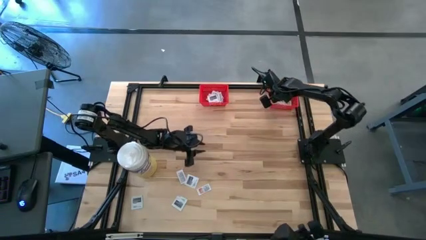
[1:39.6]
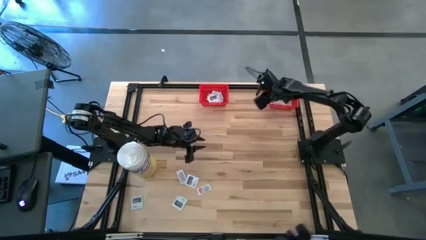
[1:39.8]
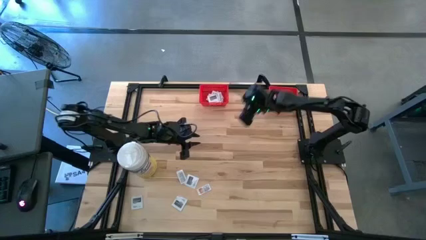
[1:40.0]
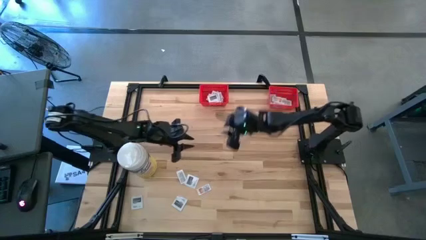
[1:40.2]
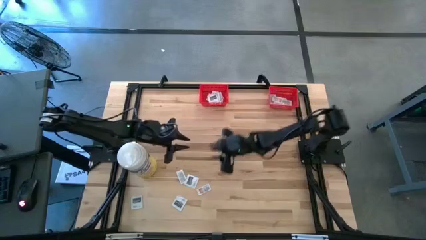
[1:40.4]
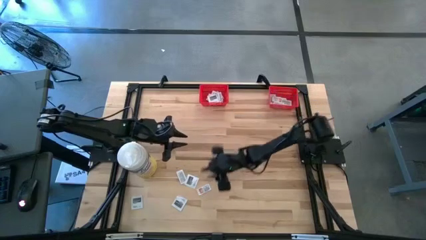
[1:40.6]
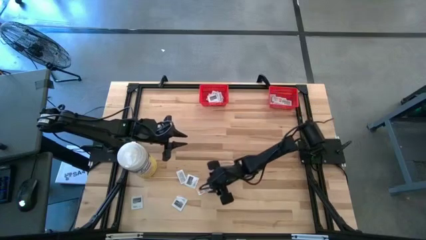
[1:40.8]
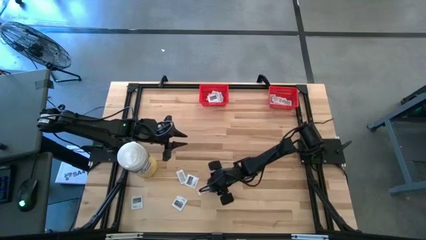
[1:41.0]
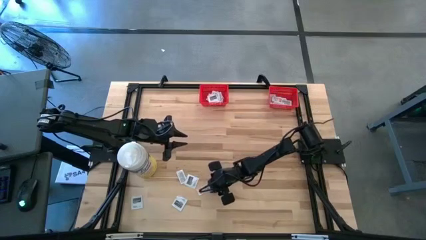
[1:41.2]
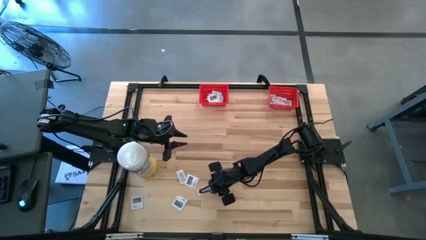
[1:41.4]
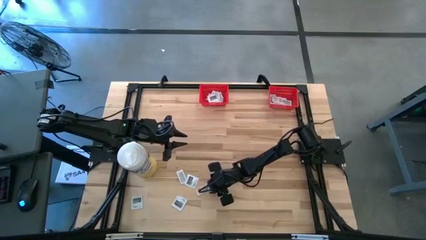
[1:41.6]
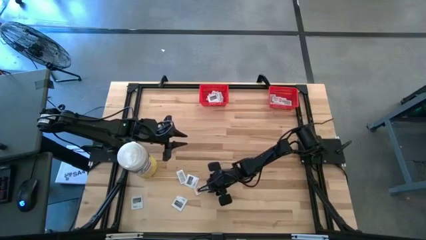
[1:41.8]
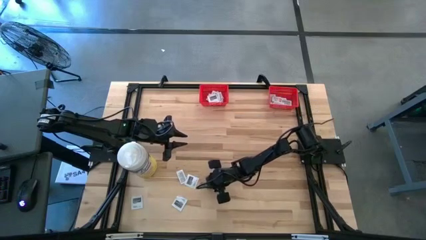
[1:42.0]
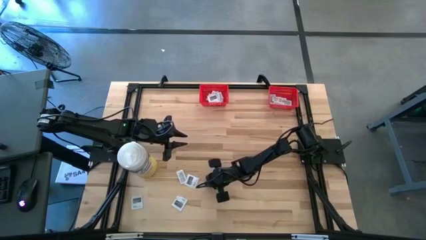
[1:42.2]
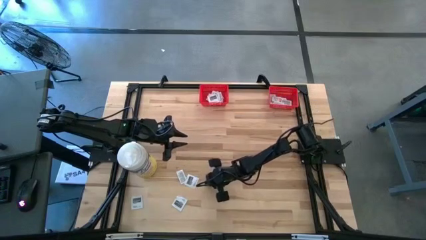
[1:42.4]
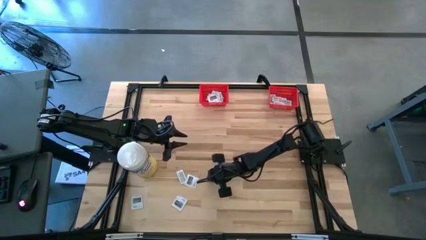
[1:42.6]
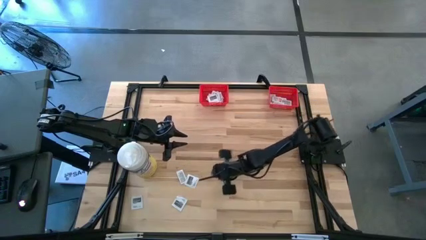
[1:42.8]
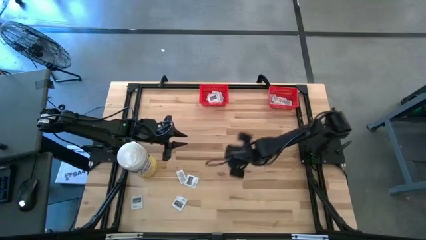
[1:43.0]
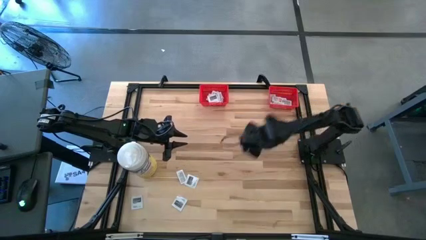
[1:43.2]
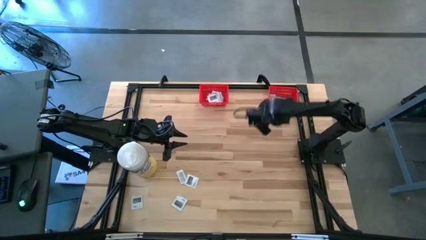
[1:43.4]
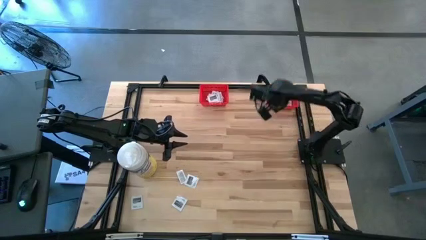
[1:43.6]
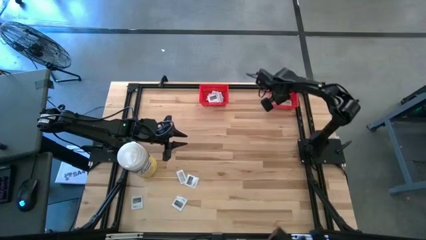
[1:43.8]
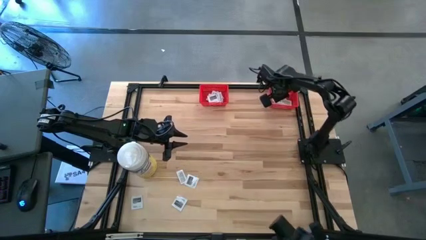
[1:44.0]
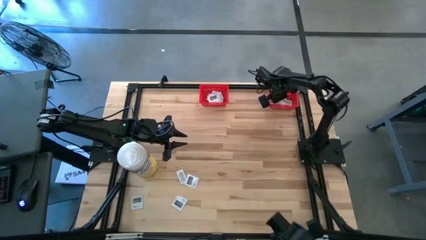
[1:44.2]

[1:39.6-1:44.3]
Task: Pick & Place First Aid Supplies
Put the ointment pack into the right red bin

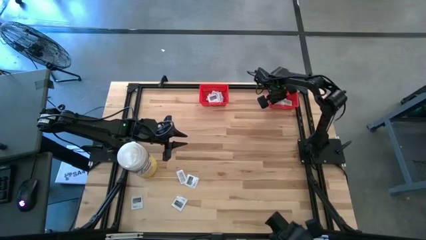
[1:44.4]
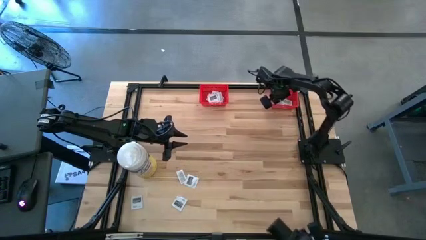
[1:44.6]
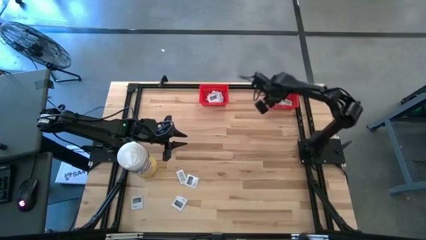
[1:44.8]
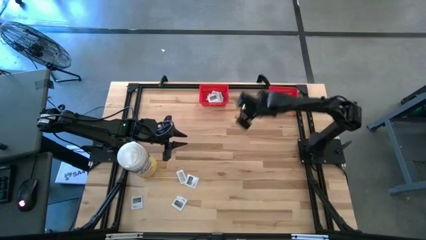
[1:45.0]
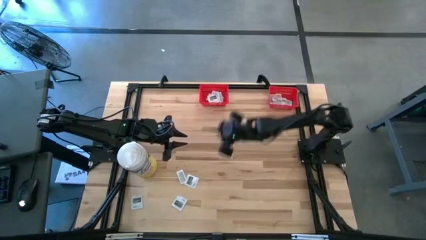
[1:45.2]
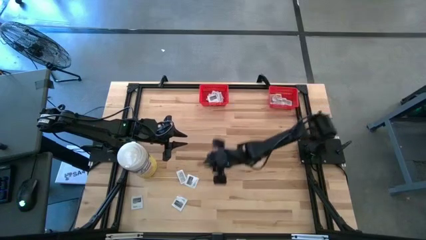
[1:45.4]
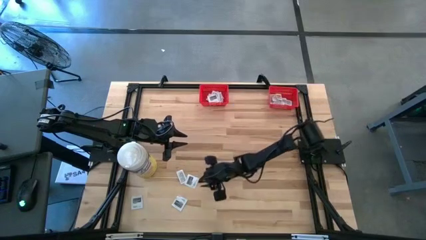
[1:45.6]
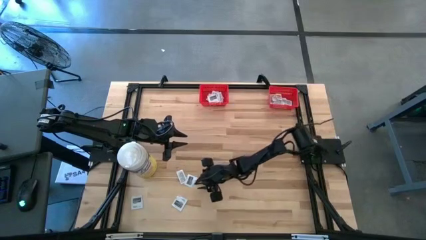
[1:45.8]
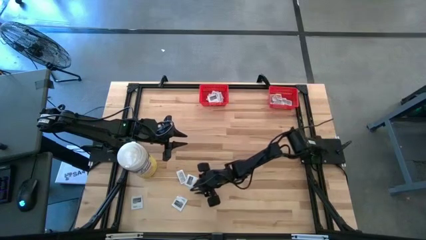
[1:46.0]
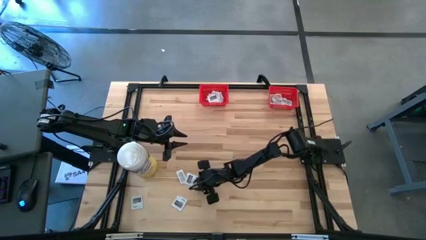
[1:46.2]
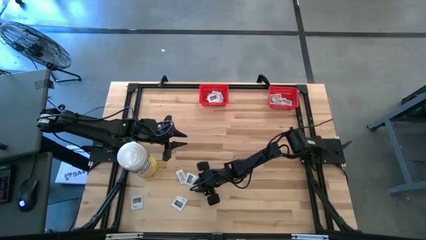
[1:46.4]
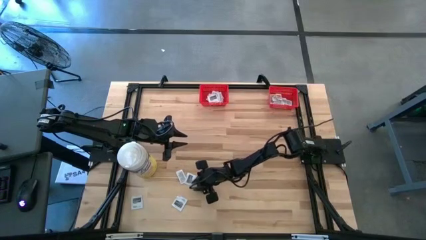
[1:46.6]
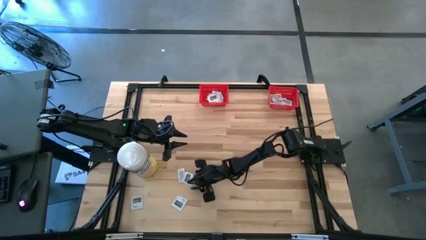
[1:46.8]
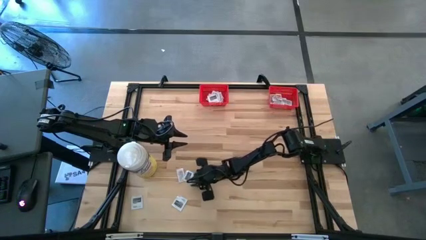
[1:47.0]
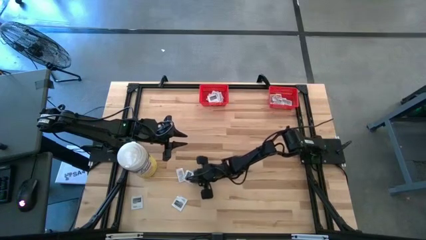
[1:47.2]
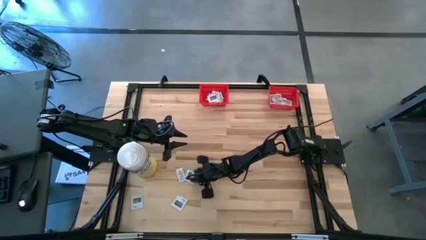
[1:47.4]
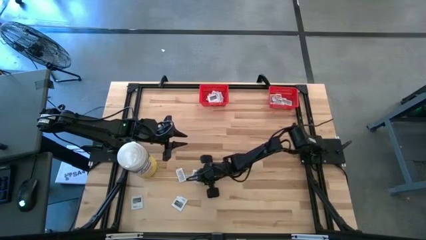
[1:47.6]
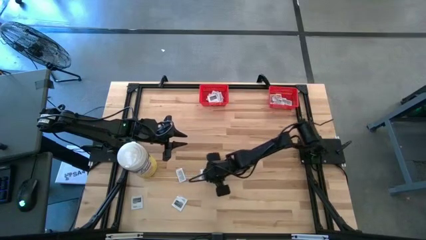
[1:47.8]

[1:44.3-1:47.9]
Put the towelette pack into the left red bin

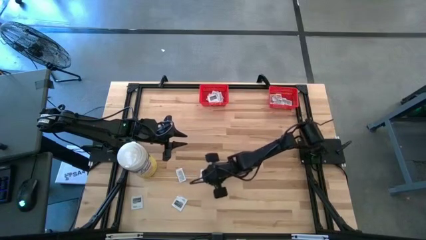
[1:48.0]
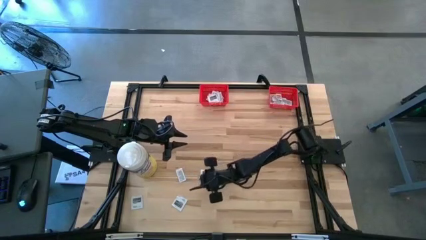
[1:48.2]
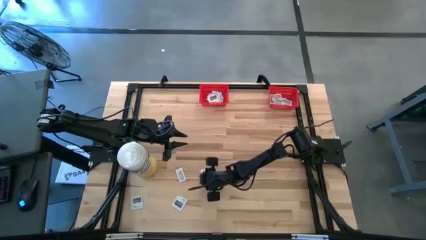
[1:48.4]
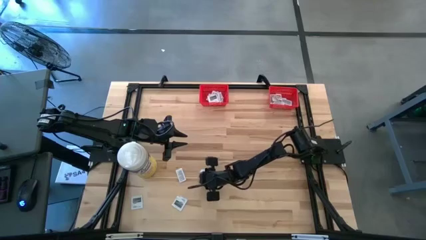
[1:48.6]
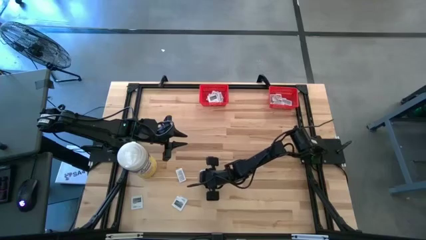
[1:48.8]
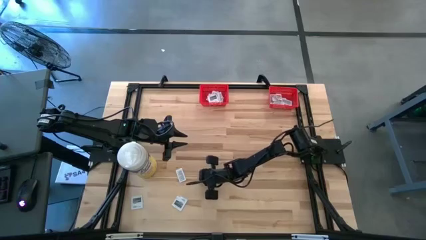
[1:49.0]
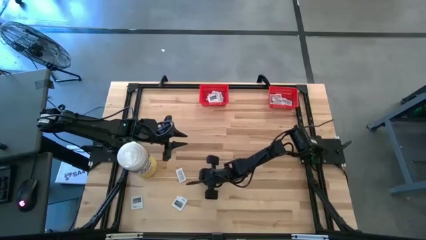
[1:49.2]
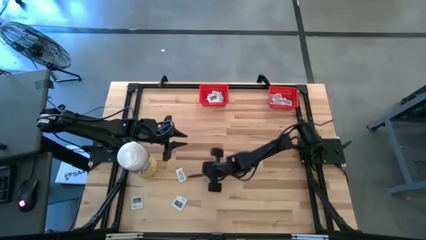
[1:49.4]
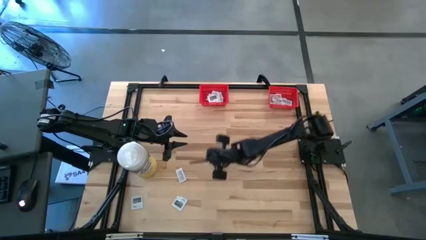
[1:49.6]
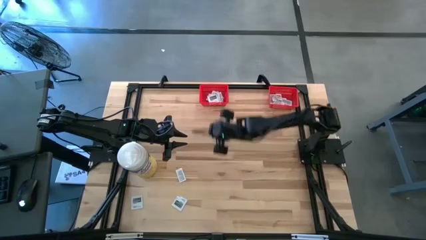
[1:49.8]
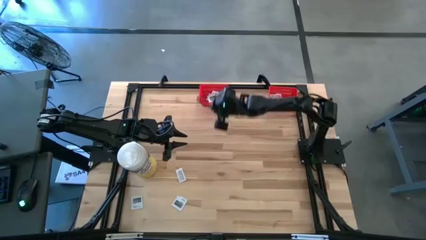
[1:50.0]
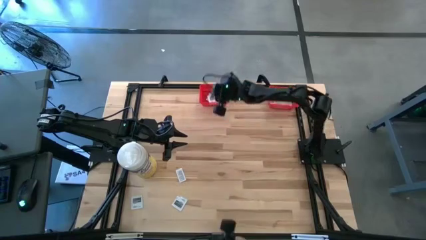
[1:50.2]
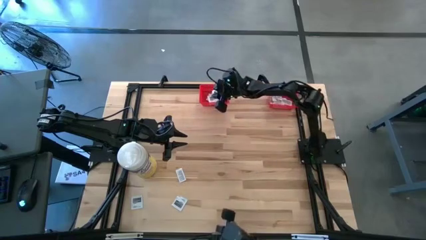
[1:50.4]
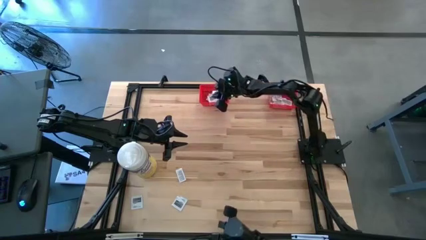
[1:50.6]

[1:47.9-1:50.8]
Put the towelette pack into the left red bin

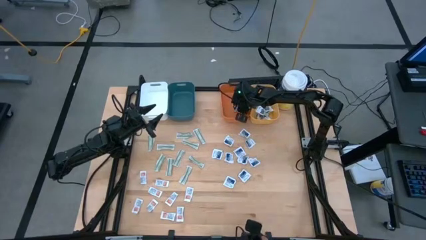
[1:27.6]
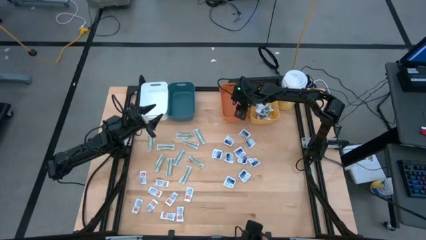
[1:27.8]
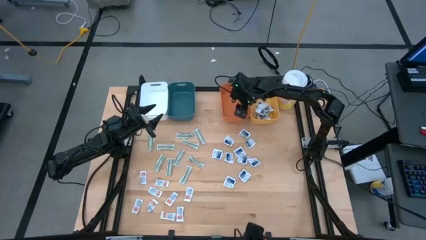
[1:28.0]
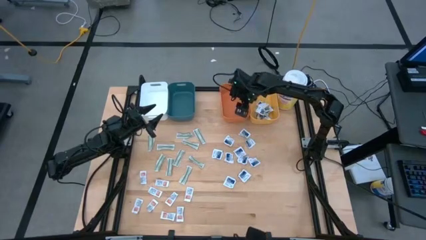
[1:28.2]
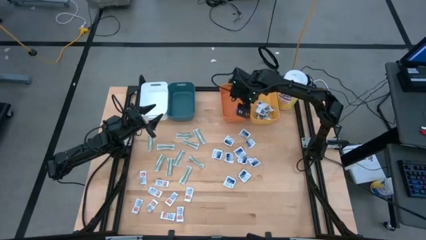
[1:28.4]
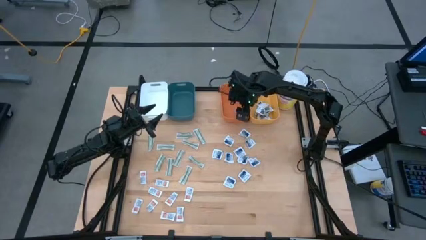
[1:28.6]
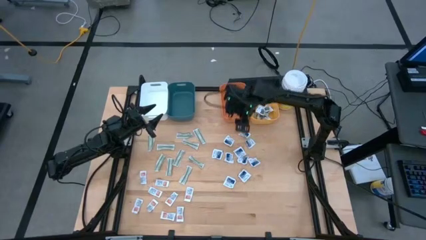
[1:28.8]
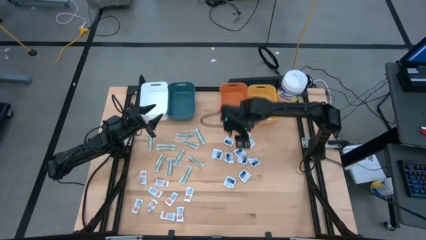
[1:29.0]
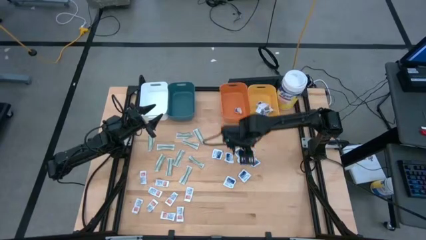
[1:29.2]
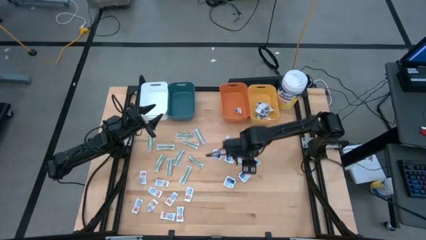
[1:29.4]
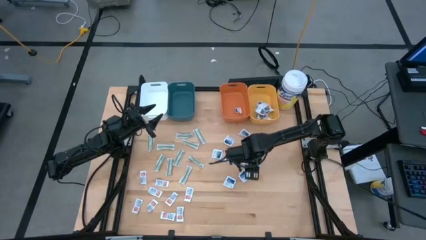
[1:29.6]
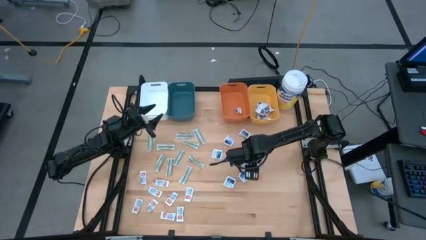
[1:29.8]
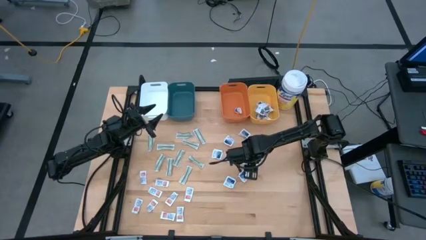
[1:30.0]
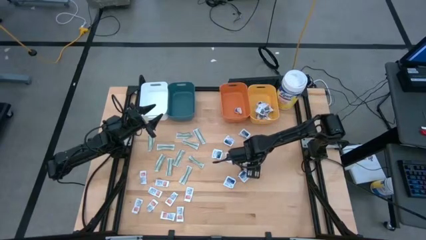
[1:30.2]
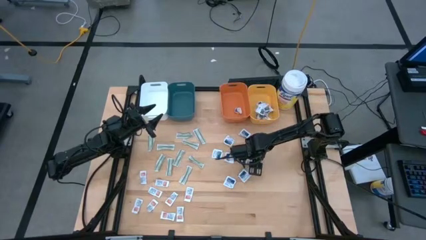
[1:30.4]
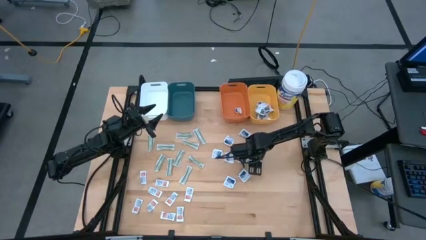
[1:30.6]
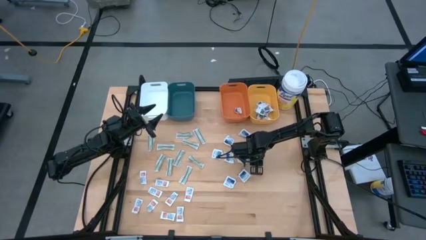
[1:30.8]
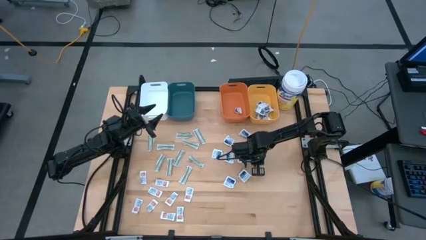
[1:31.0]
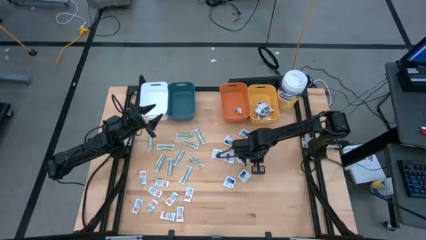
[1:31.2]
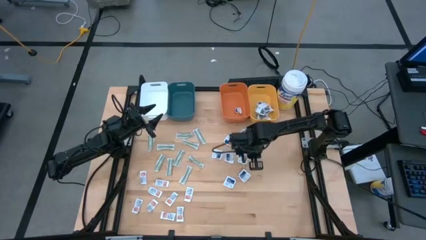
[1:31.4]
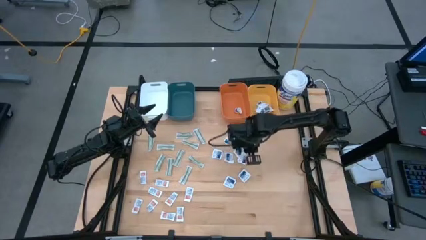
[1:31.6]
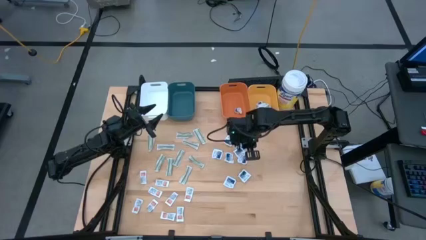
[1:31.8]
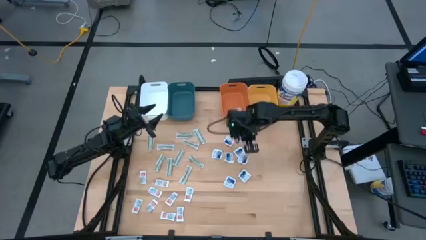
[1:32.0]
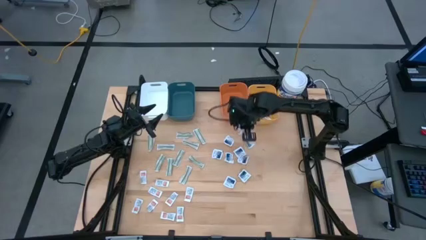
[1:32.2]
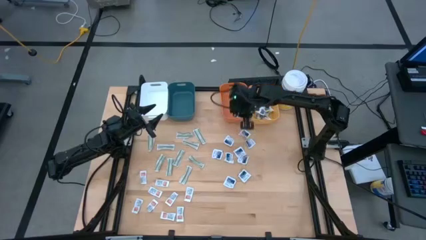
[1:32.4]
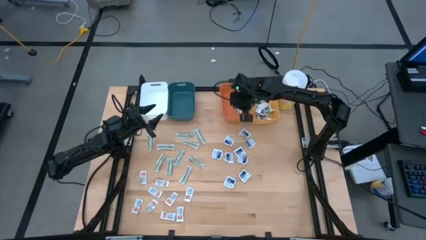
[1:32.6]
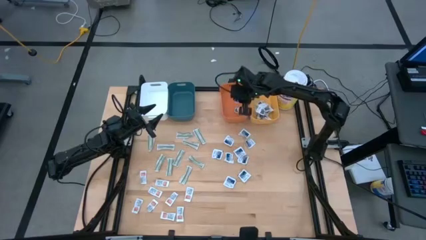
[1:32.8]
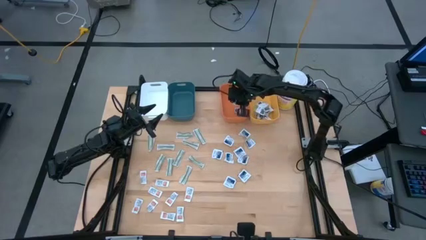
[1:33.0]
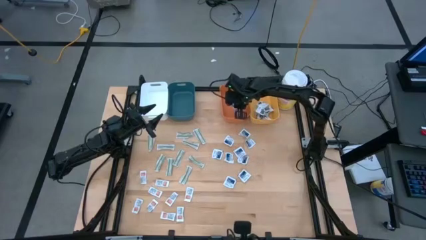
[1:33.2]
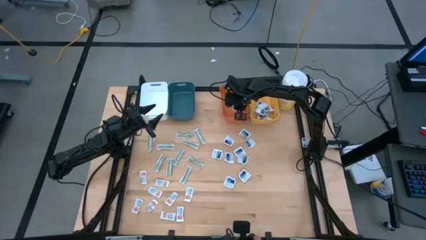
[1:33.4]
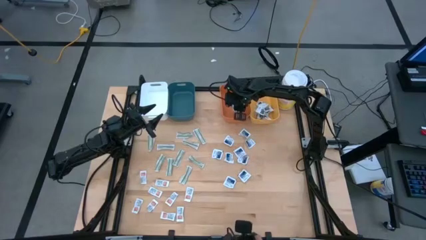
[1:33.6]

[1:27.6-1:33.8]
Task: Pick & Place First Aid Supplies
Put the alcohol pad into the orange bin
